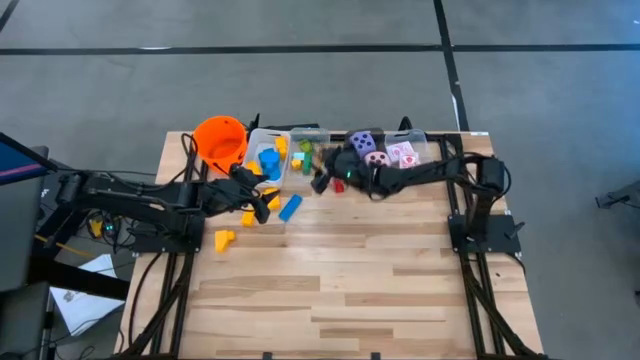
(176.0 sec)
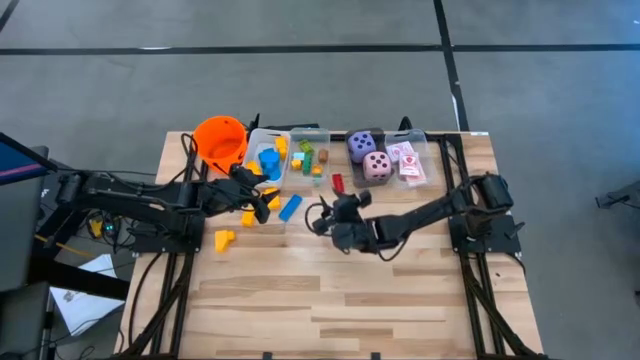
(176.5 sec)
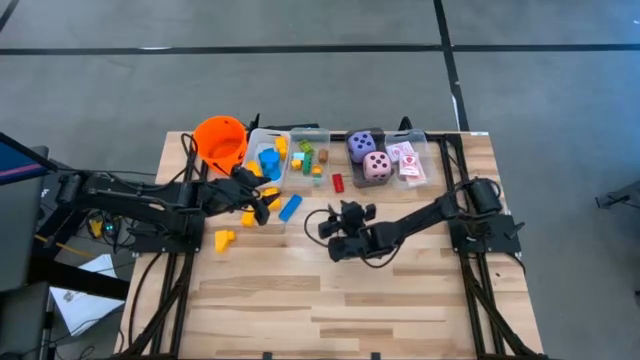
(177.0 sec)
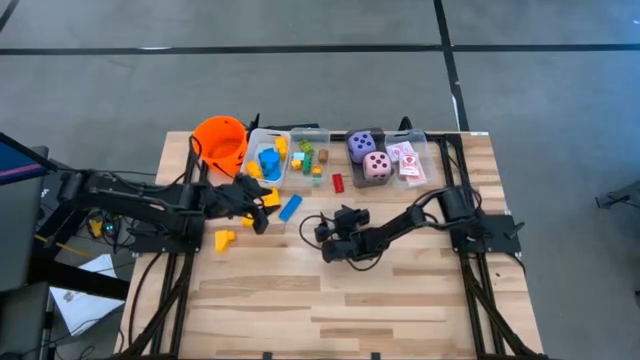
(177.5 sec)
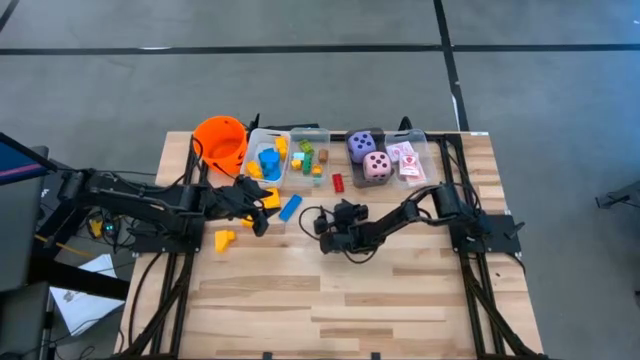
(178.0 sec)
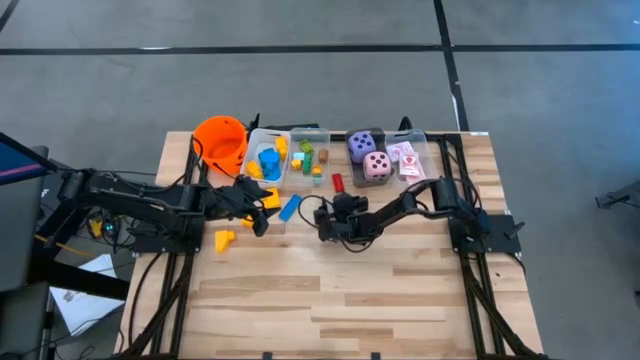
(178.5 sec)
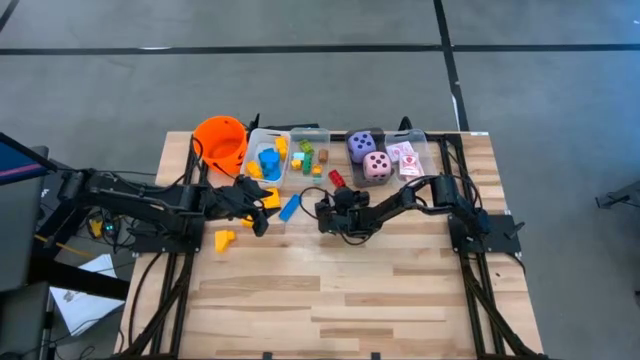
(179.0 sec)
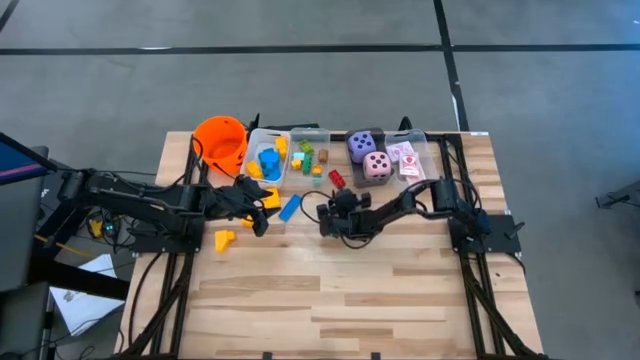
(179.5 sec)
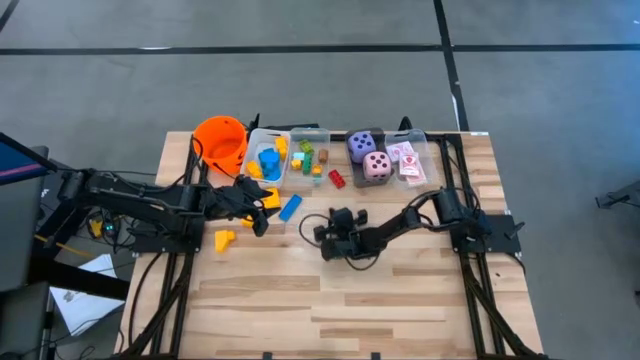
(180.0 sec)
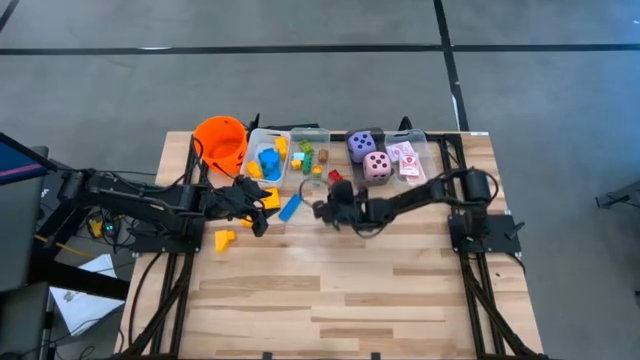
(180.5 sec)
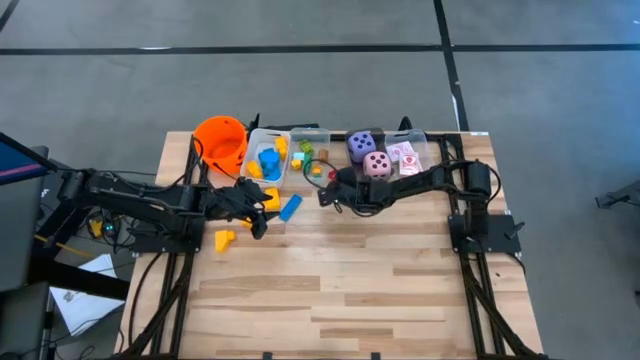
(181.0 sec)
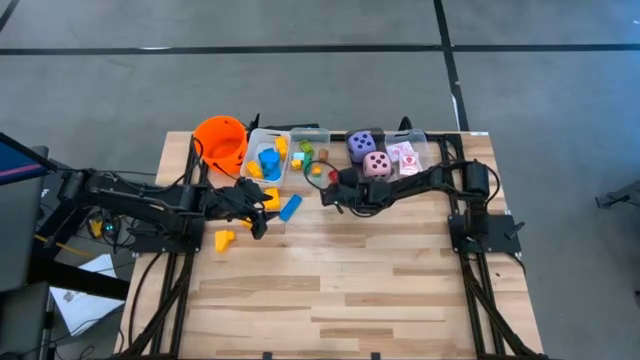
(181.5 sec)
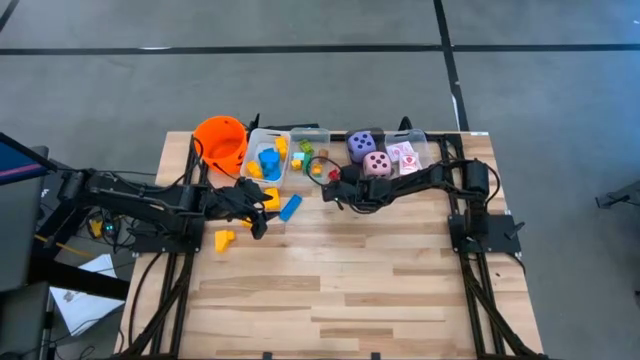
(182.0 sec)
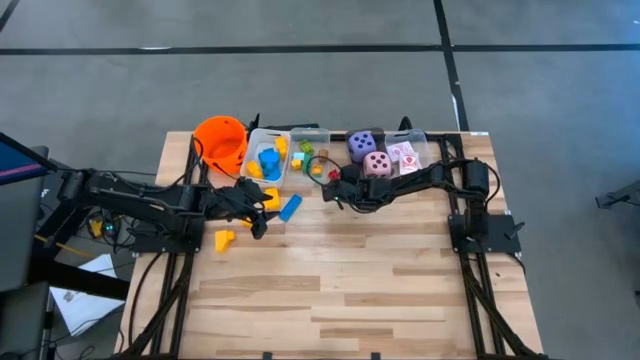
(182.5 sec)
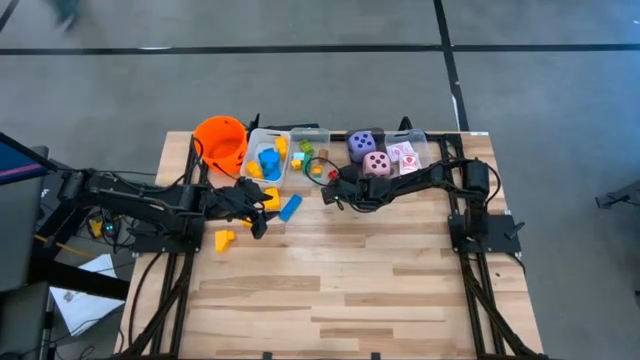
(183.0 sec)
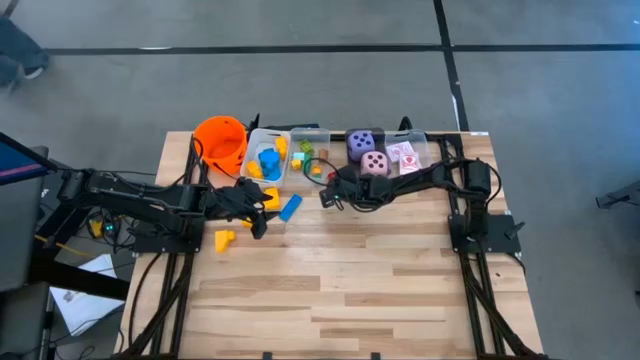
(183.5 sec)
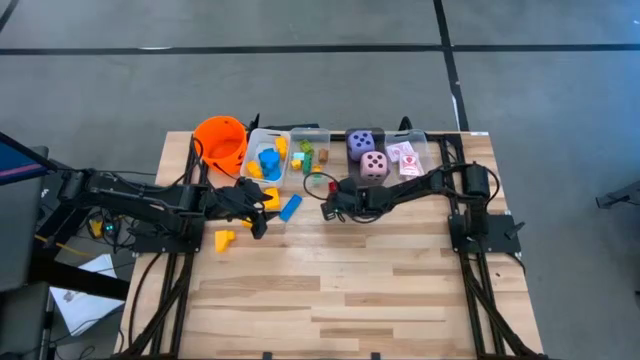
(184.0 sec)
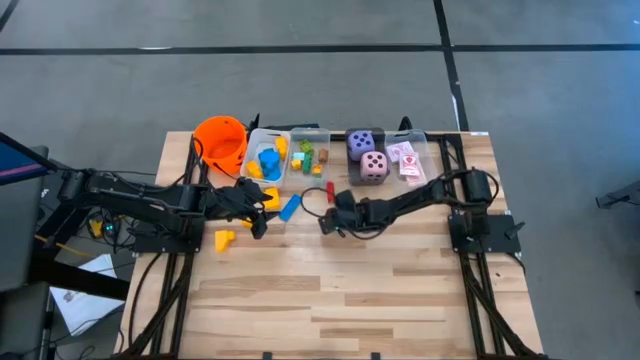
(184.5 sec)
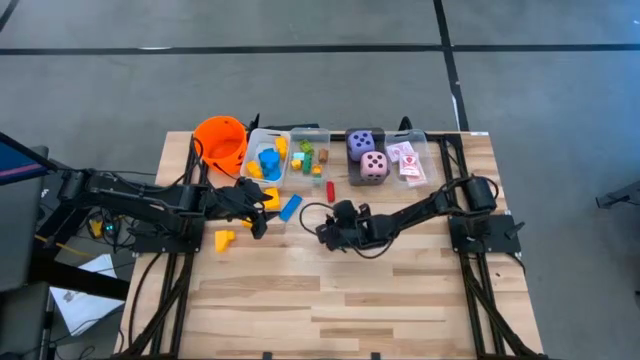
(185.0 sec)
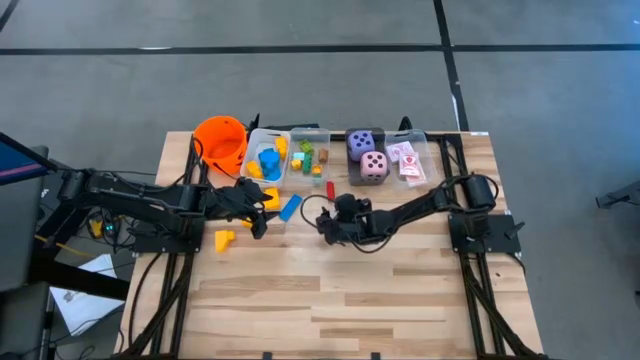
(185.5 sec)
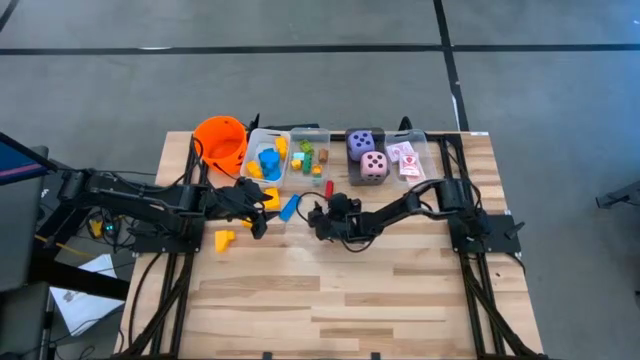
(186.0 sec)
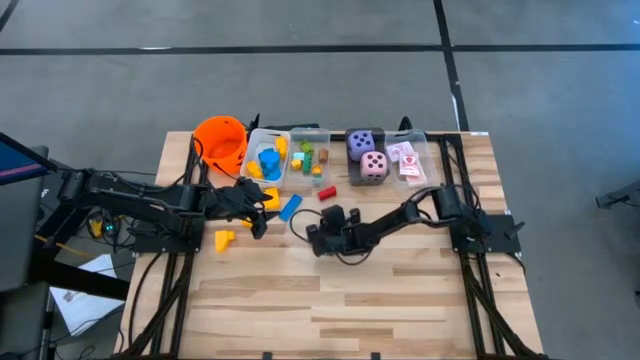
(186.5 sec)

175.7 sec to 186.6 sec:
Task: Pick & Place Toys
Put the small red game piece into the left transparent bin

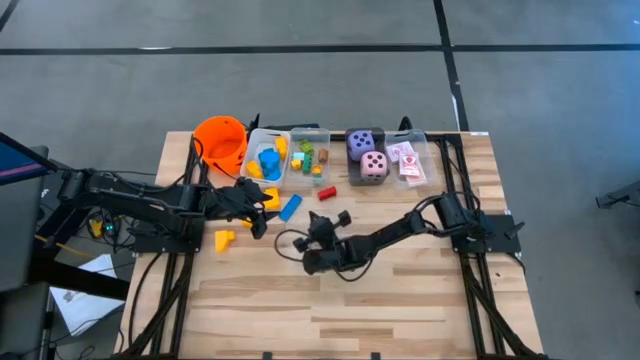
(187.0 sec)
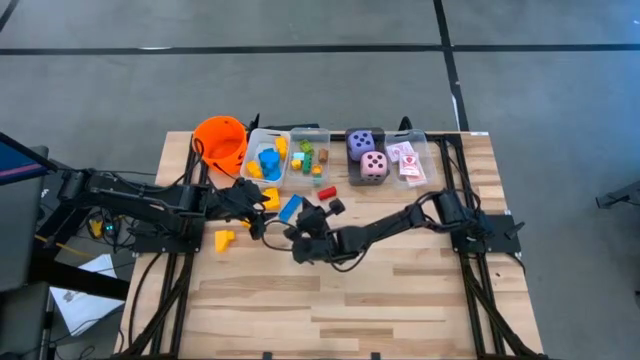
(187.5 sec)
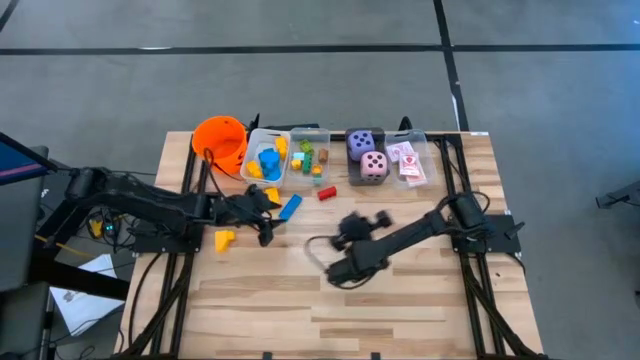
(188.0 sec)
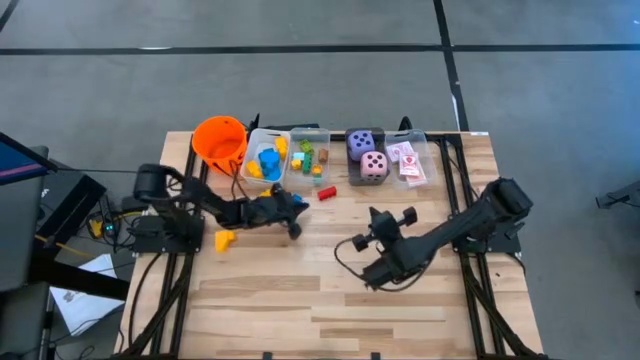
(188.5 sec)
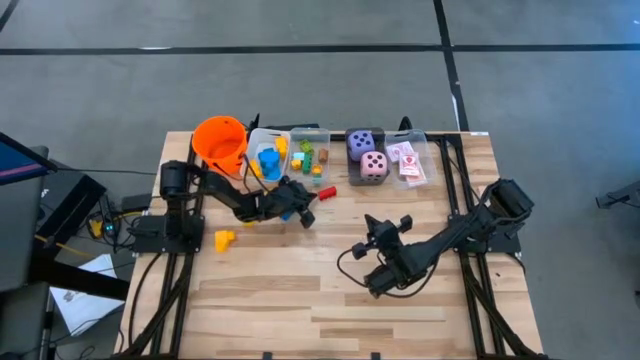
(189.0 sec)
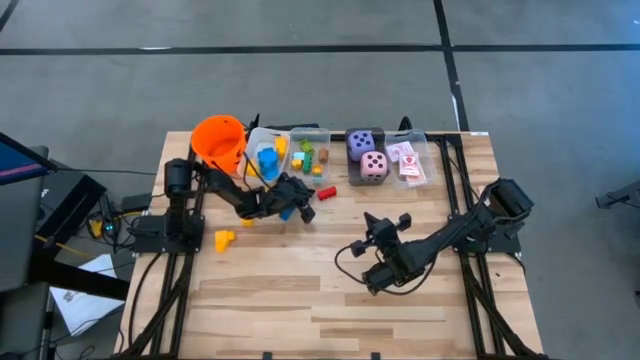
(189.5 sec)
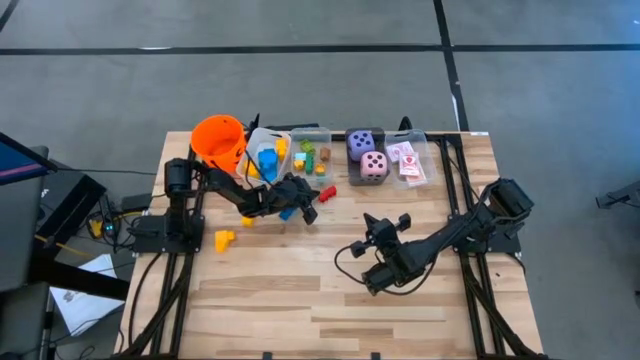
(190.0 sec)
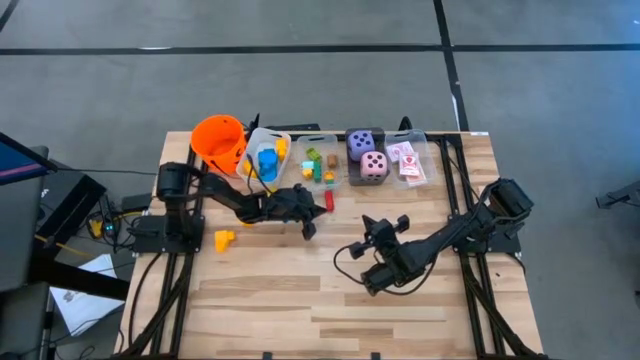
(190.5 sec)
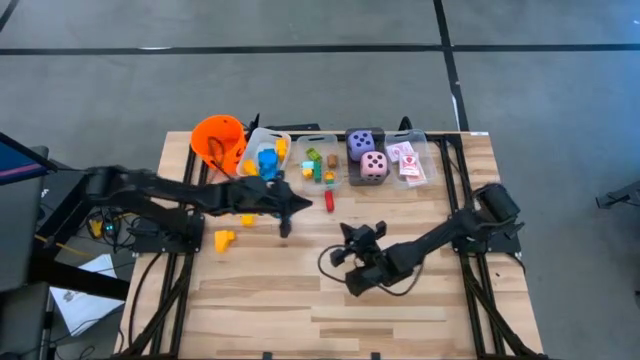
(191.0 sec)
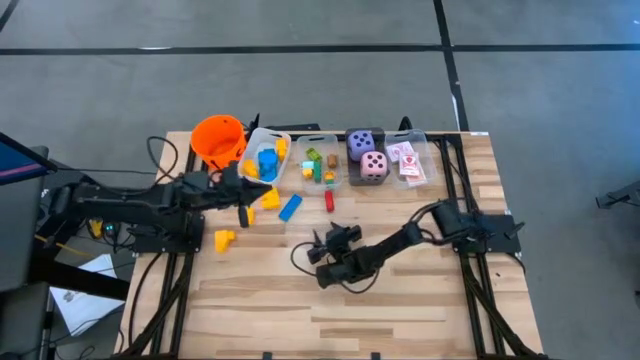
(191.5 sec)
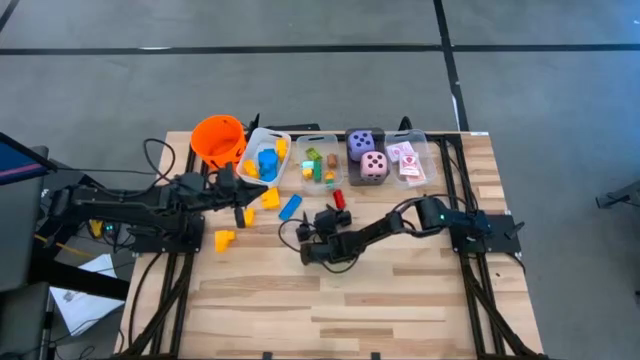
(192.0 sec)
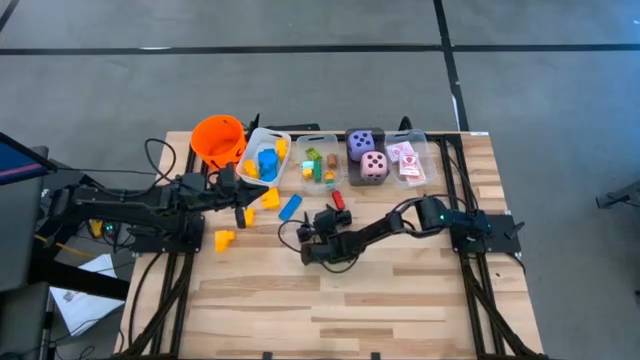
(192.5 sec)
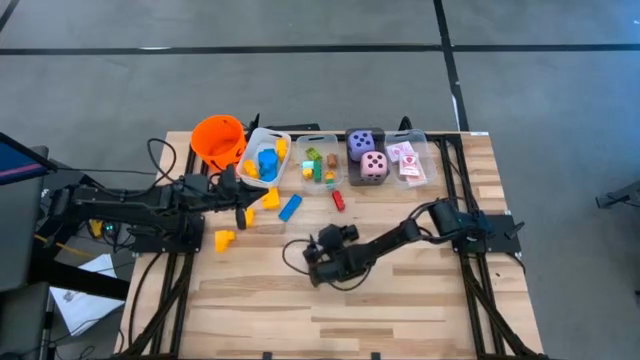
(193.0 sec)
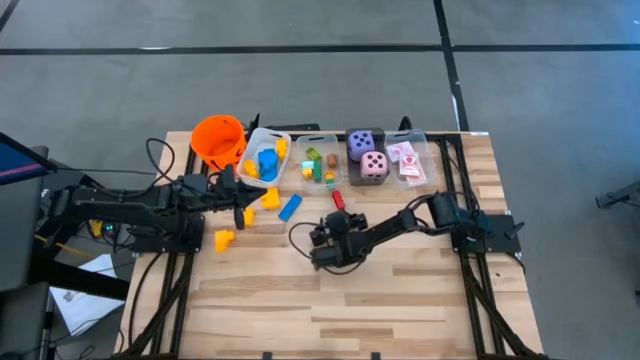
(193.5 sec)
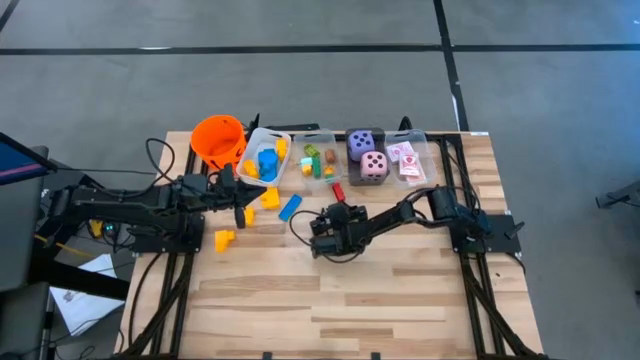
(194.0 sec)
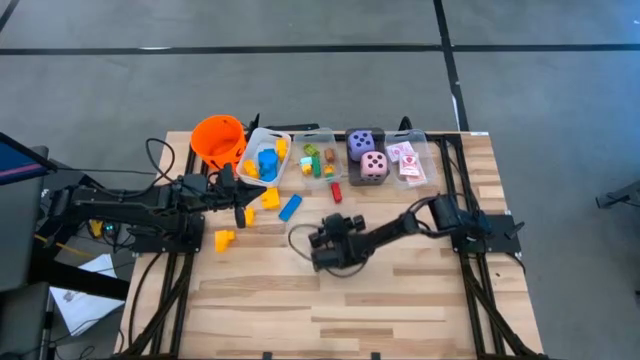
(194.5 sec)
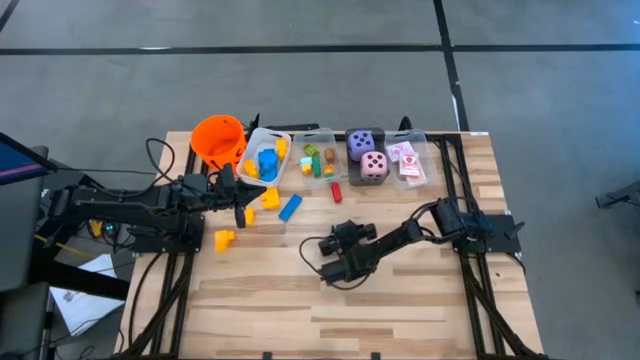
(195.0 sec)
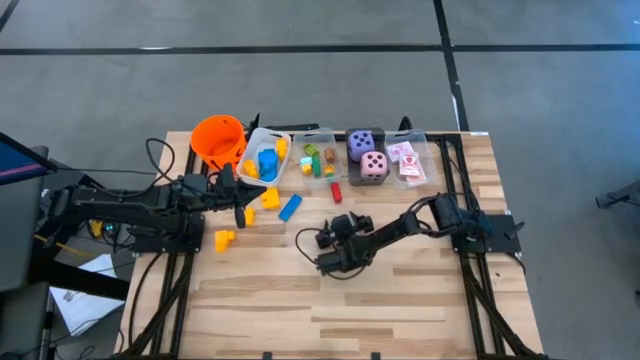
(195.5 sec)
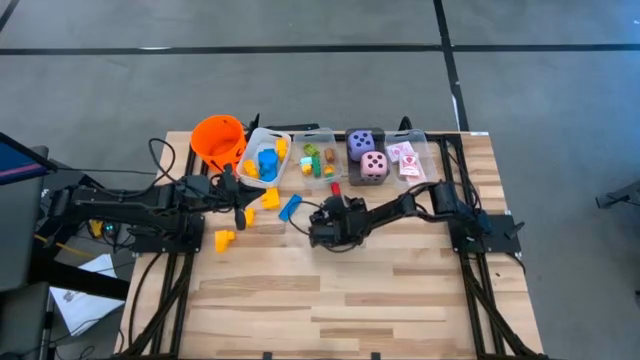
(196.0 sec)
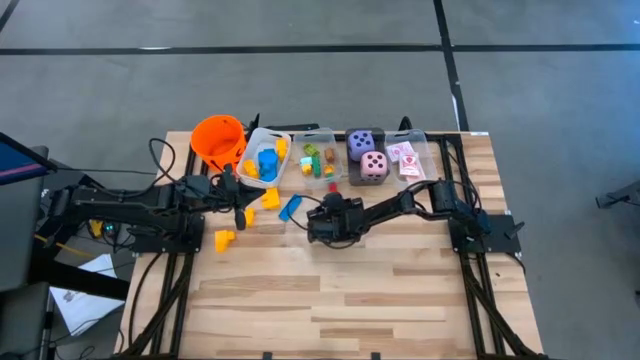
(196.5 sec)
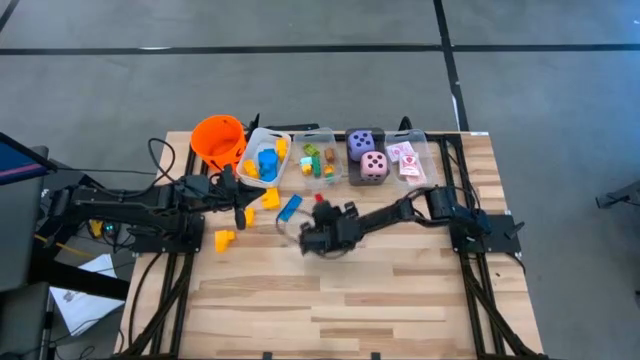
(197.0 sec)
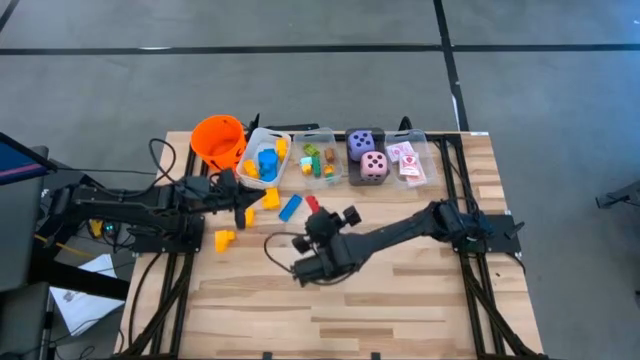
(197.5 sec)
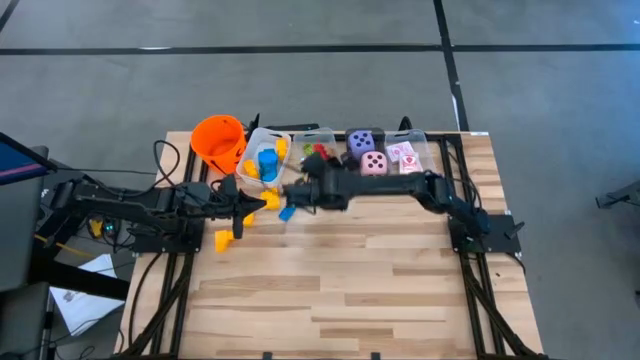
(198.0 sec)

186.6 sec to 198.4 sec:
Put the small red game piece into the left transparent bin
